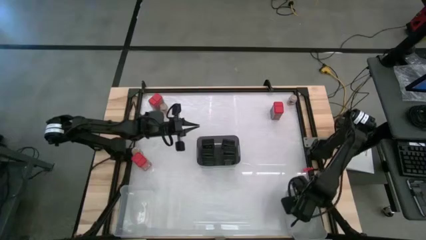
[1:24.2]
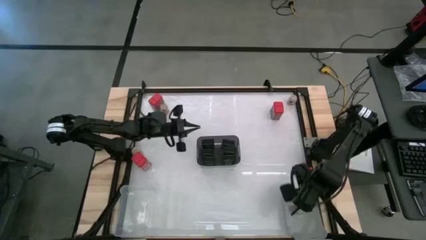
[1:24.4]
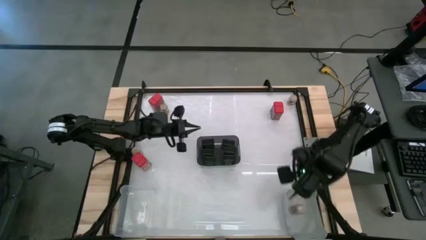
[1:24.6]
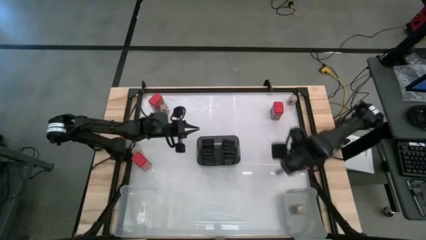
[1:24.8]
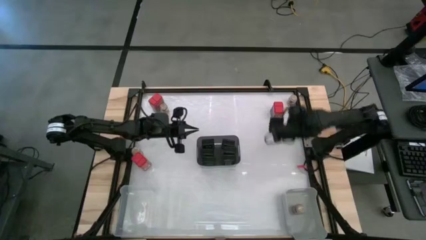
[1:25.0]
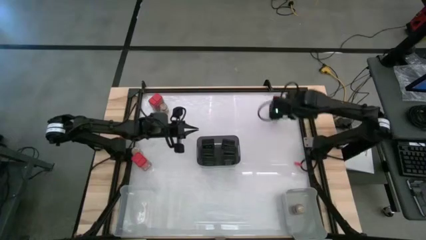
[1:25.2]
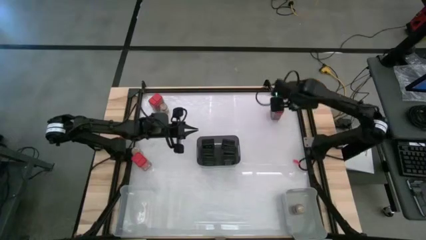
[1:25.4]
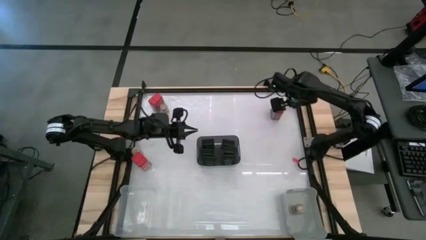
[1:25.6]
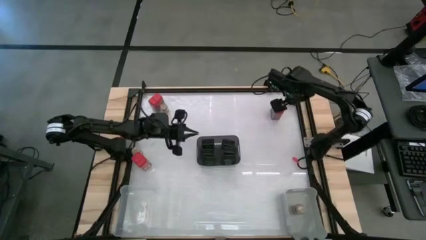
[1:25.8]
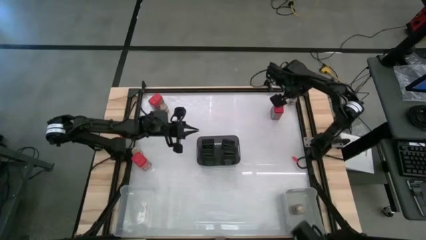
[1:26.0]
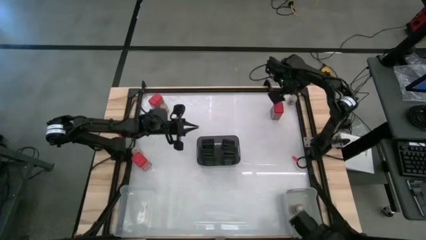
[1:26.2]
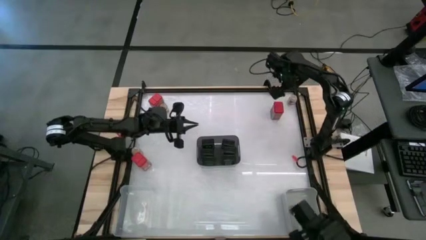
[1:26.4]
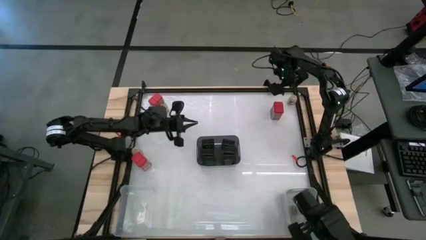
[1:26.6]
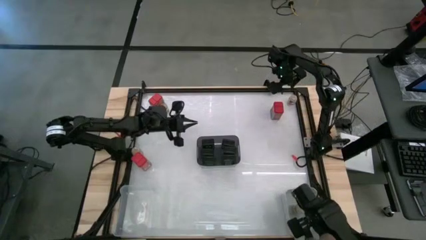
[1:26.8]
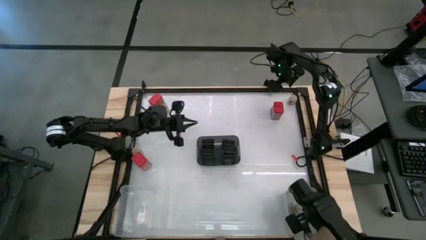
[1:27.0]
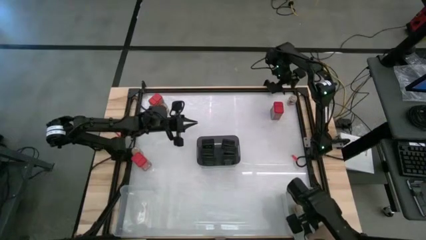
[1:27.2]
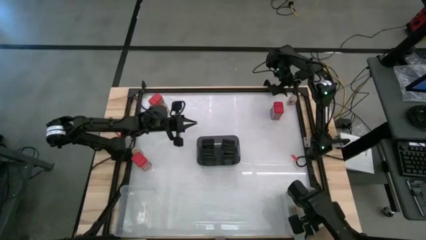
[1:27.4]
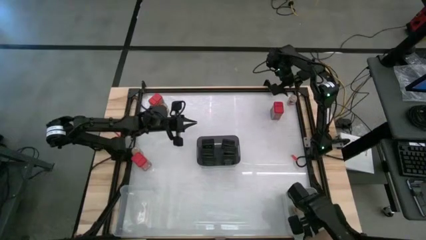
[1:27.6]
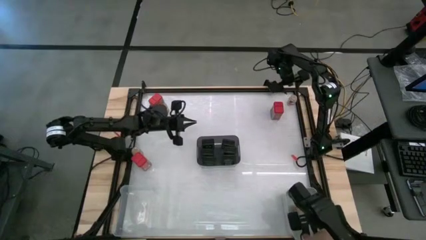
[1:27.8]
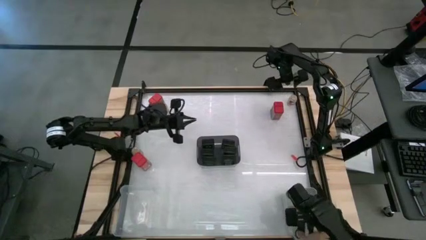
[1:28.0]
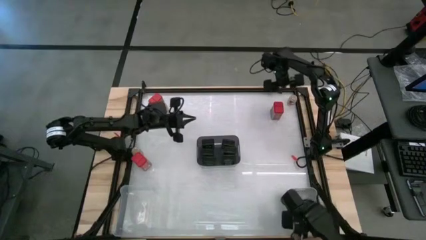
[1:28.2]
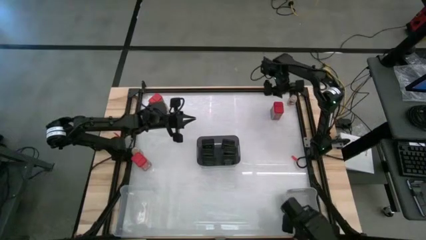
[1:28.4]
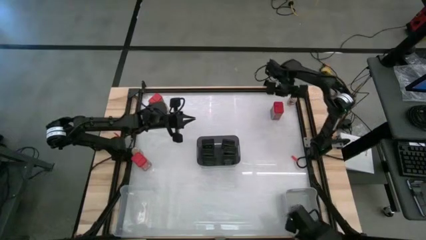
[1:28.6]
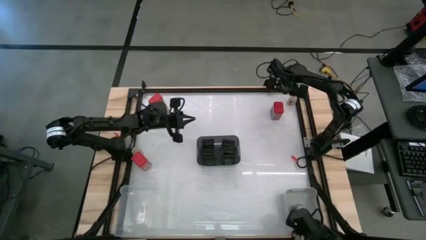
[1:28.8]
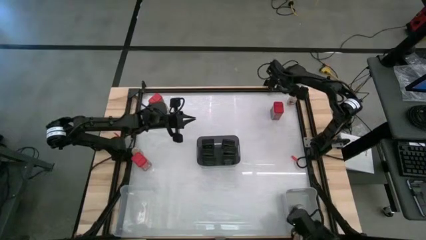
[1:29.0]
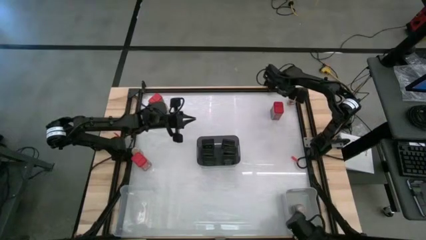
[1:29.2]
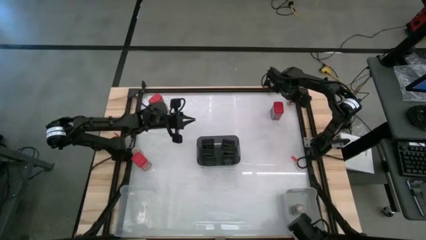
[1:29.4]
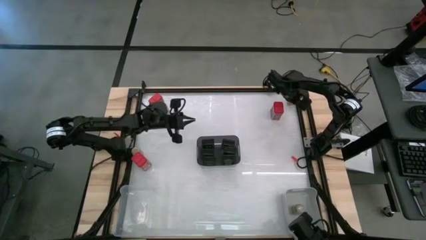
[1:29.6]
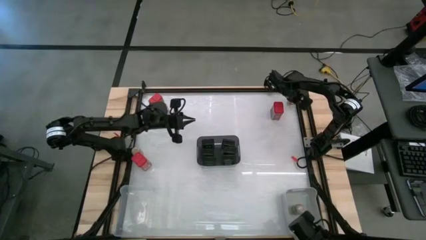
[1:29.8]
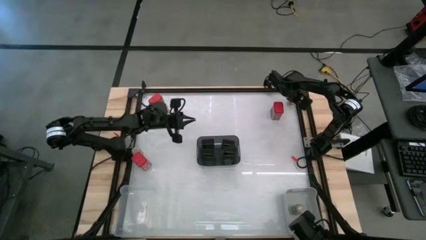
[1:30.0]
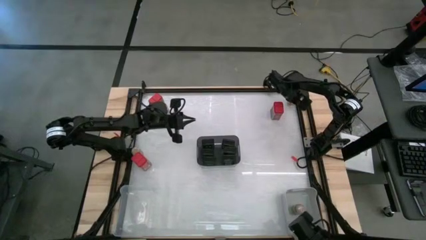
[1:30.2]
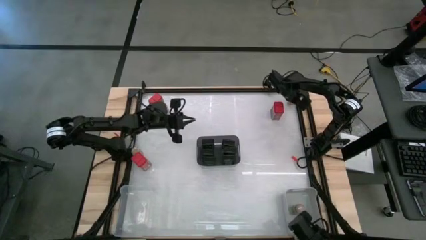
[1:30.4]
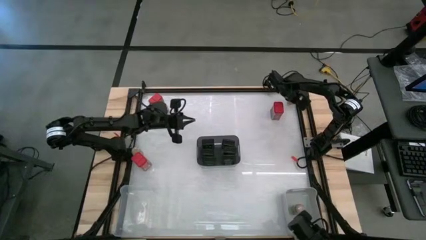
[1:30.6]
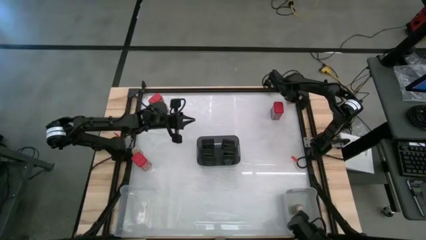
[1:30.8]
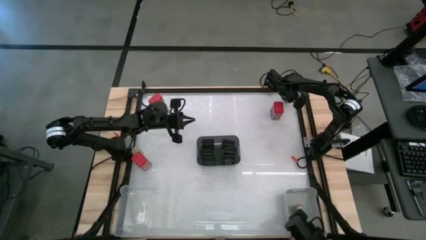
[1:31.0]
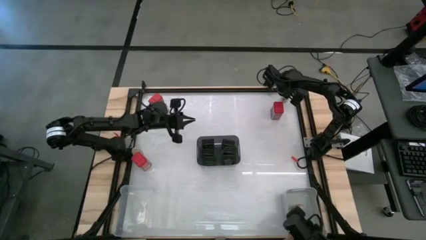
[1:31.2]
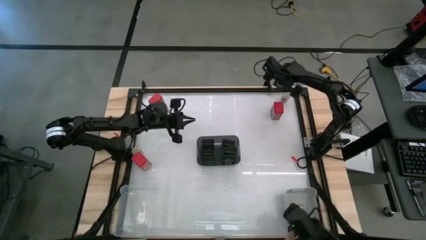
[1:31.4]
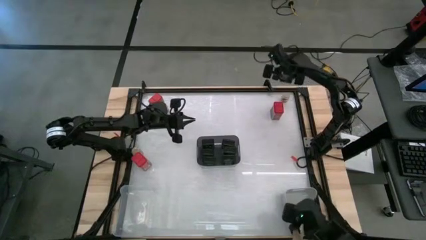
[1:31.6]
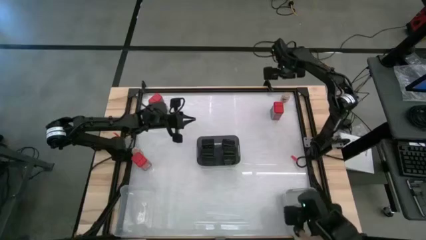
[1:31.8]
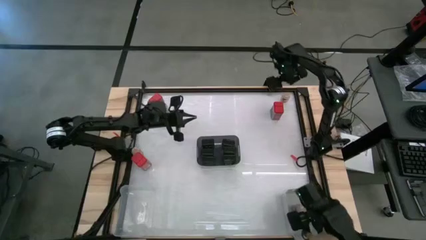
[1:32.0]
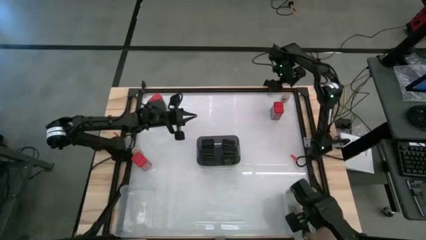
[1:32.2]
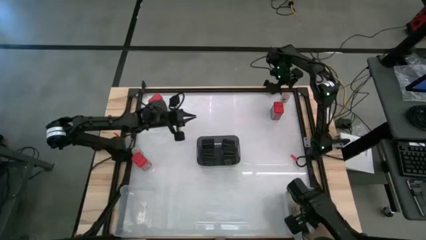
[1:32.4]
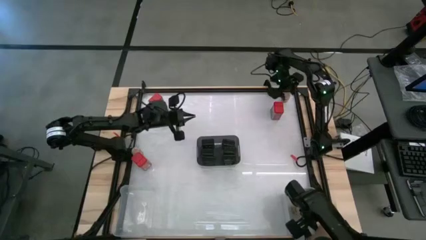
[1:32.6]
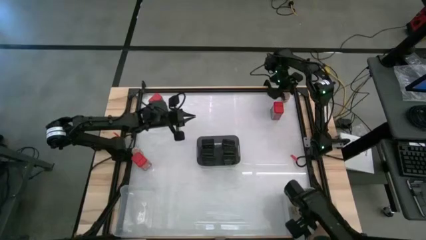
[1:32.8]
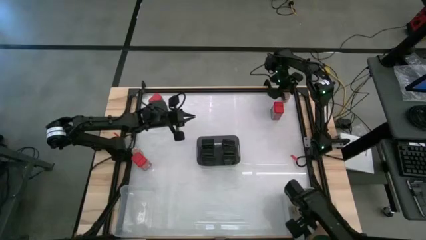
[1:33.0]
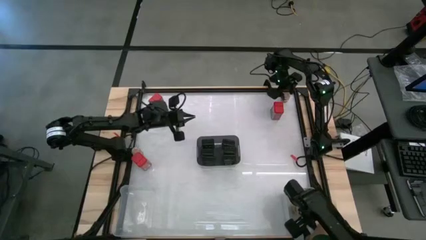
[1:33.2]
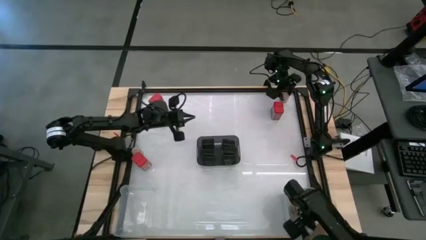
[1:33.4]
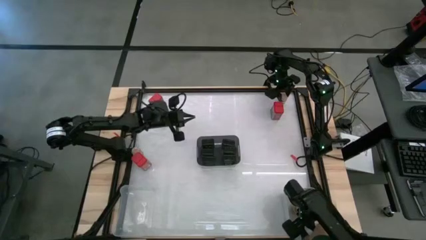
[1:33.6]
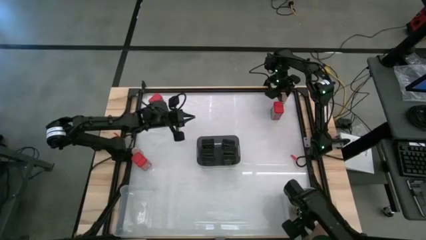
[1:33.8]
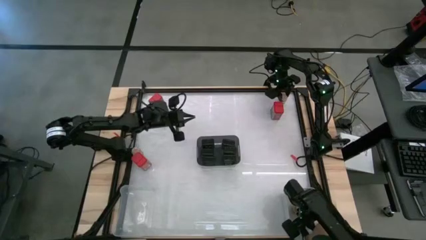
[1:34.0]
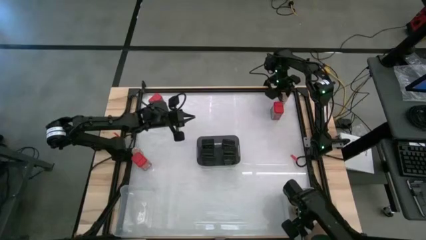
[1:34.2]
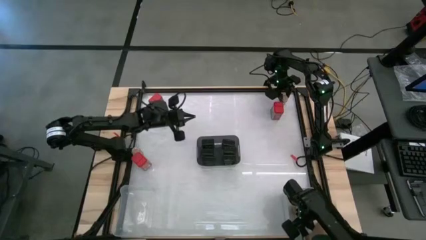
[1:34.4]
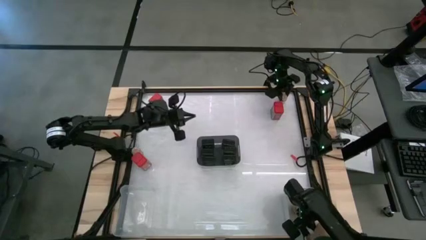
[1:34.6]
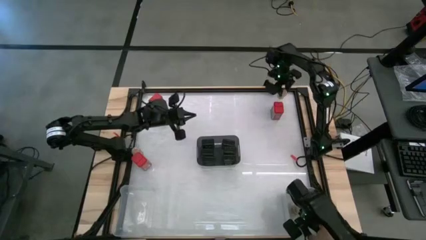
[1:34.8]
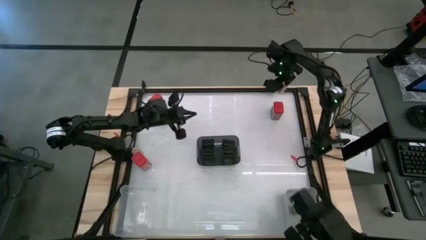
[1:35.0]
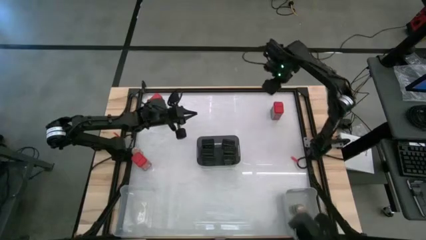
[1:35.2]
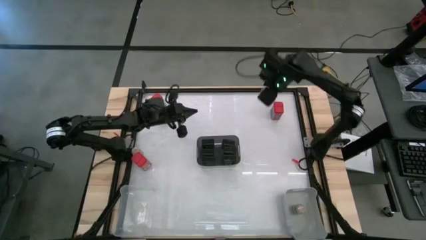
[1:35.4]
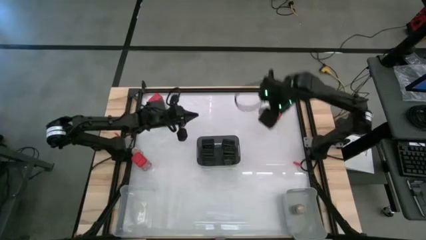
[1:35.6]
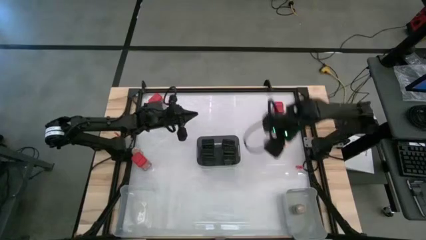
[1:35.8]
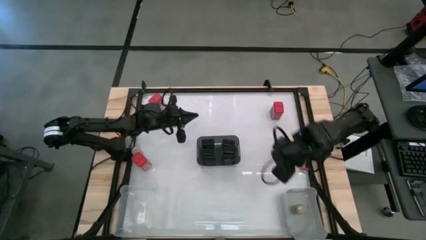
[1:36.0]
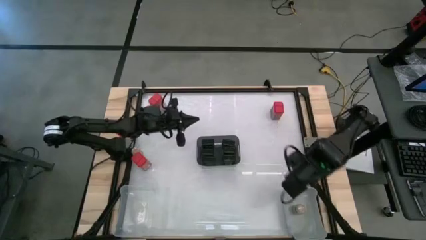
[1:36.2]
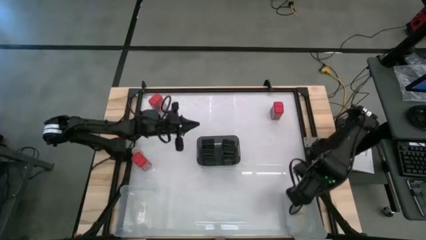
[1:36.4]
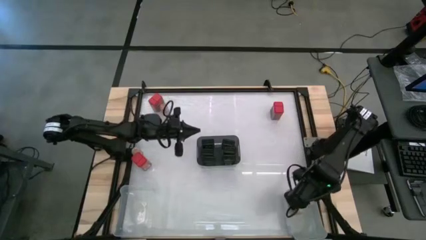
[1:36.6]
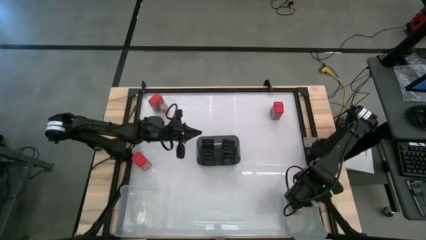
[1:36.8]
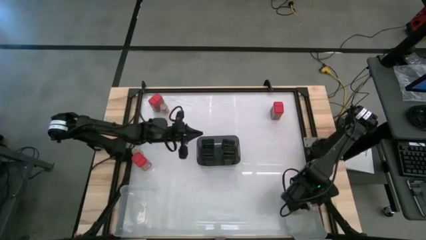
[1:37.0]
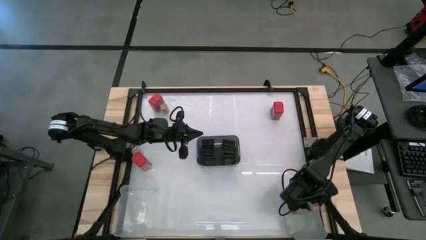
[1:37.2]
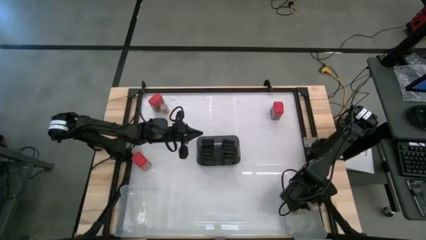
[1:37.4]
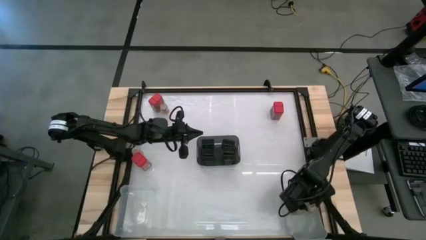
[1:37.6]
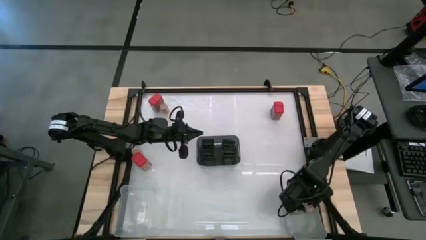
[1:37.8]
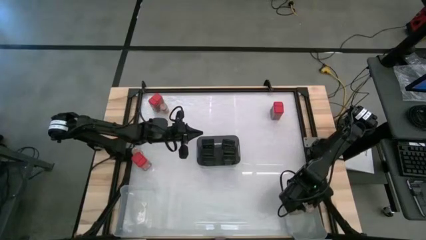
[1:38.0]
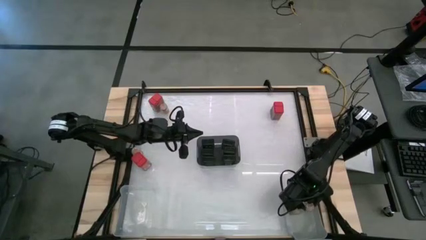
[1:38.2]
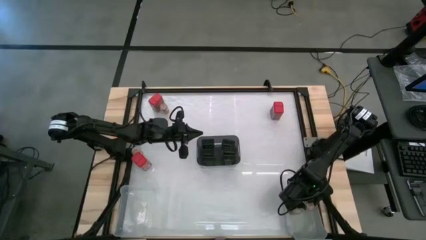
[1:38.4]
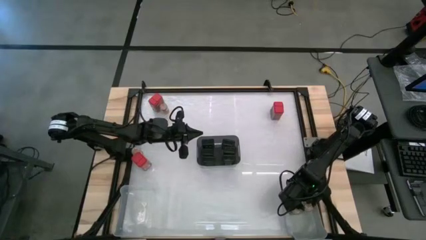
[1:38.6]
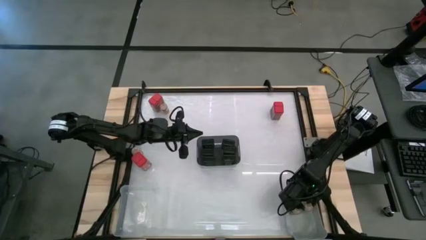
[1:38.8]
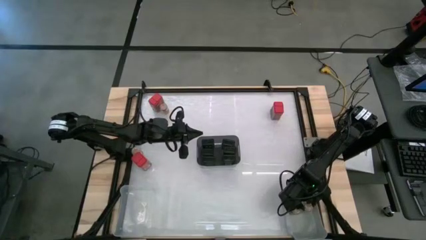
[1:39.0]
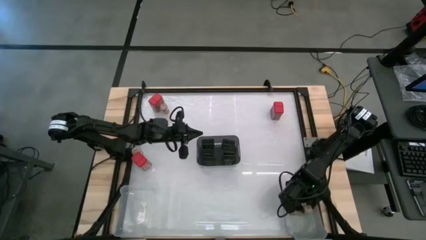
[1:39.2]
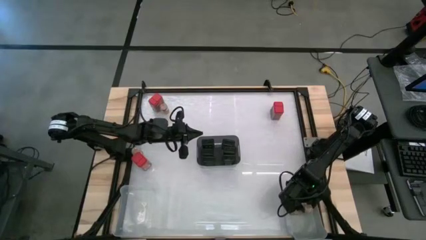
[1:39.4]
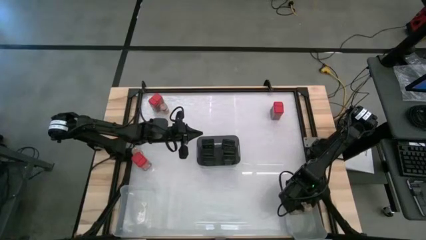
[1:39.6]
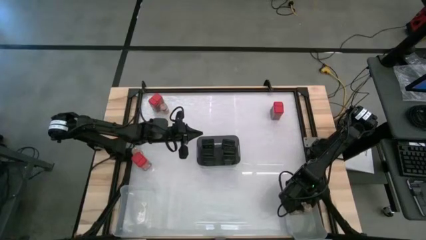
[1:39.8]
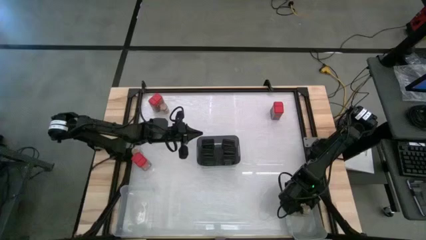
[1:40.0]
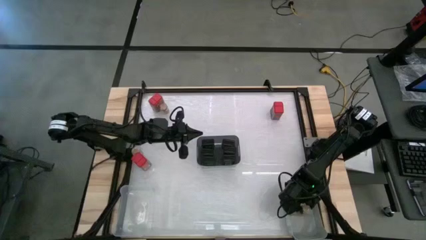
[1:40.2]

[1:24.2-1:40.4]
Task: Sort spices by type
Put the brown seasoning bottle into the gray bin

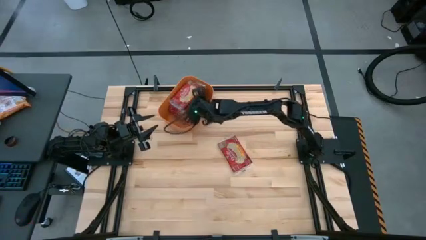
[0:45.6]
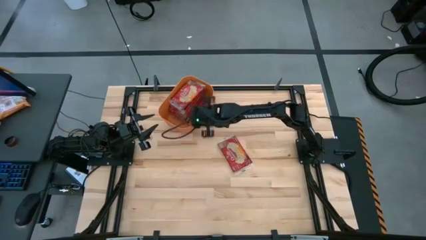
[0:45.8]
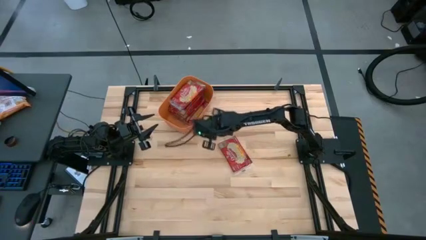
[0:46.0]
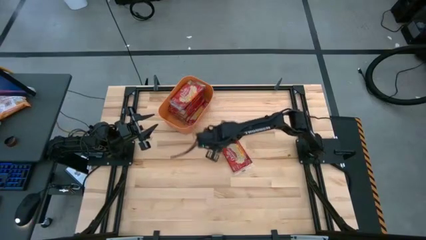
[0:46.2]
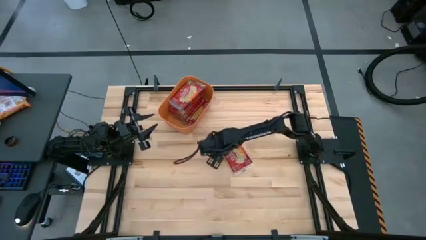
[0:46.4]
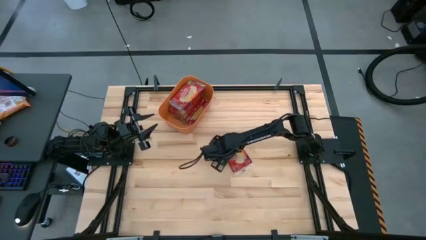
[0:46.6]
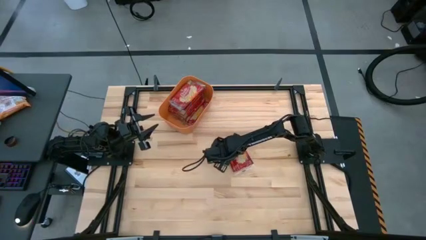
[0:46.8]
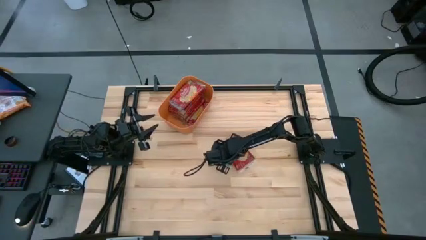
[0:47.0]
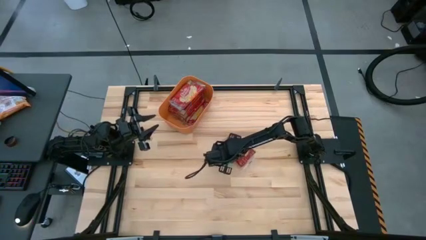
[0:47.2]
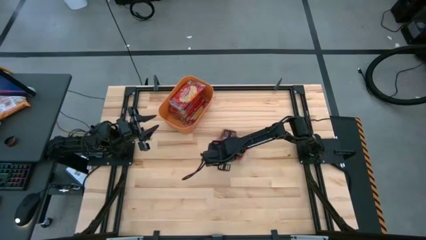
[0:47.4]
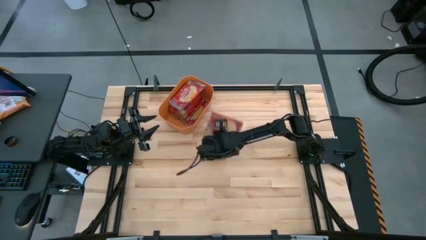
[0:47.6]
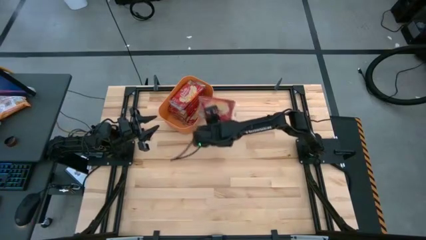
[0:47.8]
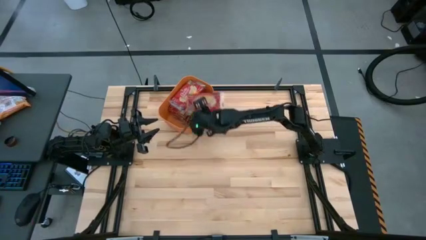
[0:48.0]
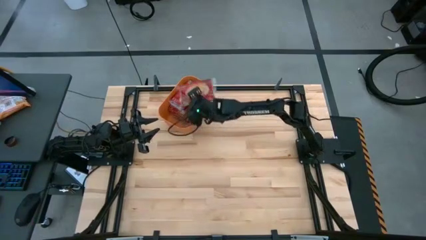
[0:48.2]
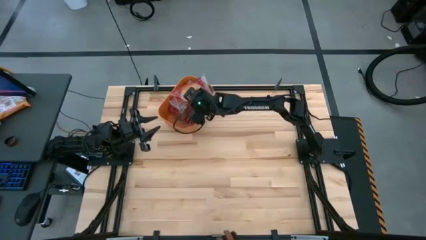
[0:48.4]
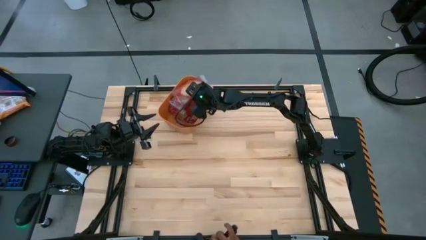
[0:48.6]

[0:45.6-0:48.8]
Task: Sort popcorn bags into baskets
Put the red popcorn bag into the orange bin
